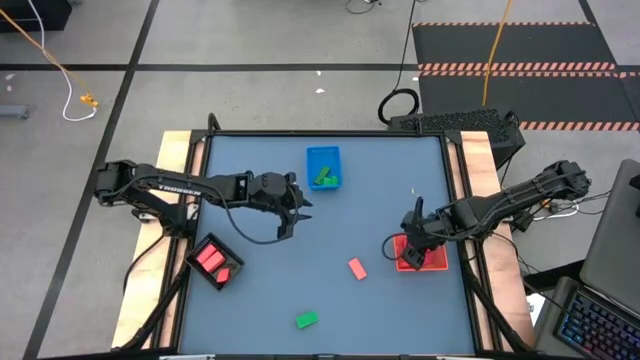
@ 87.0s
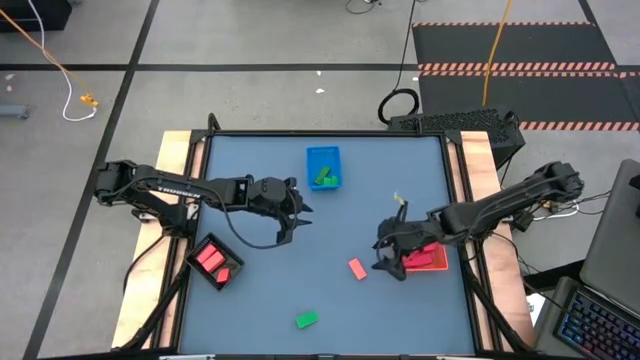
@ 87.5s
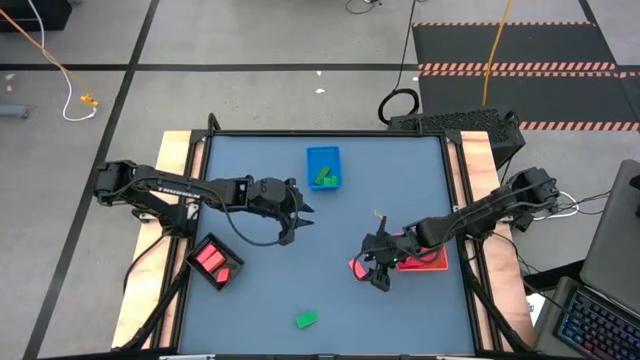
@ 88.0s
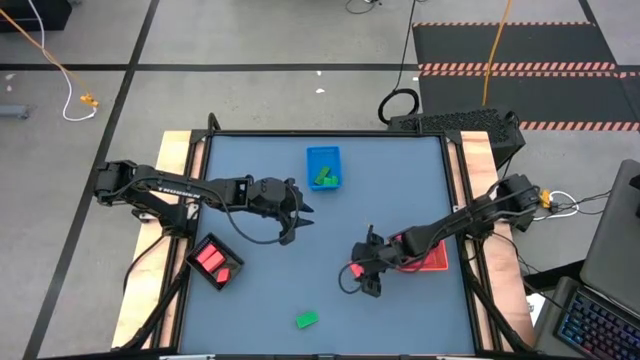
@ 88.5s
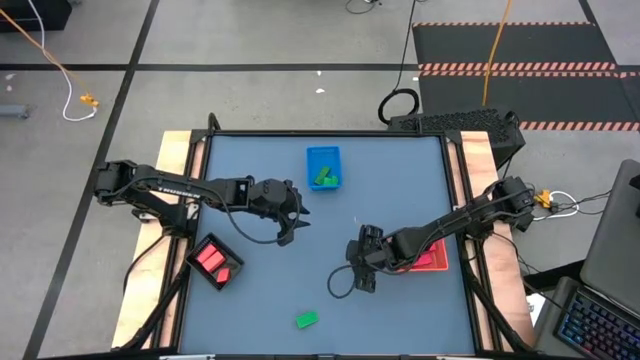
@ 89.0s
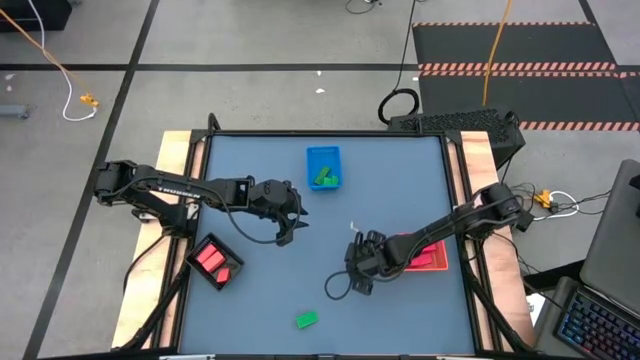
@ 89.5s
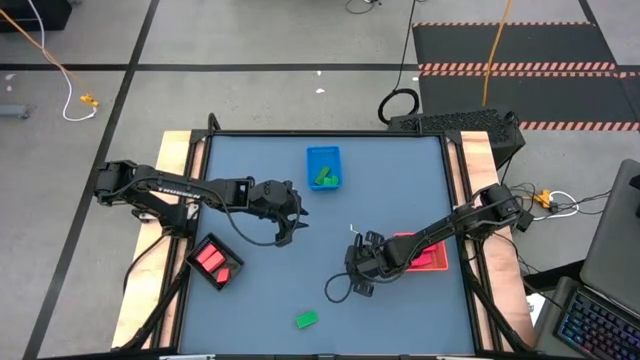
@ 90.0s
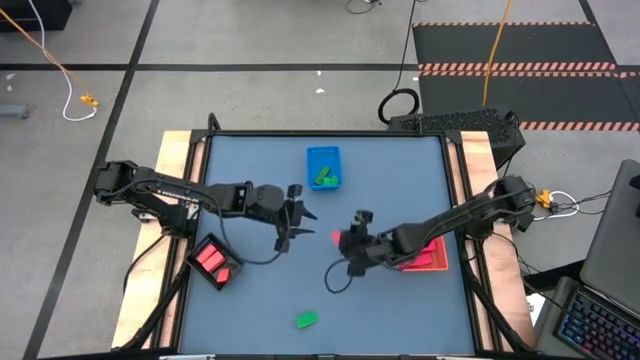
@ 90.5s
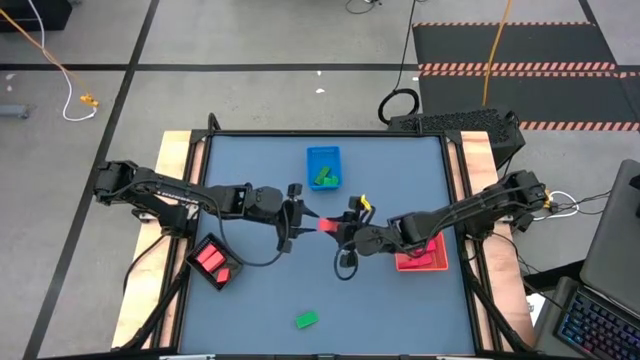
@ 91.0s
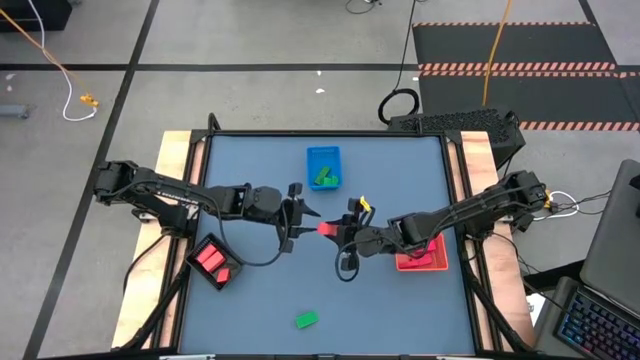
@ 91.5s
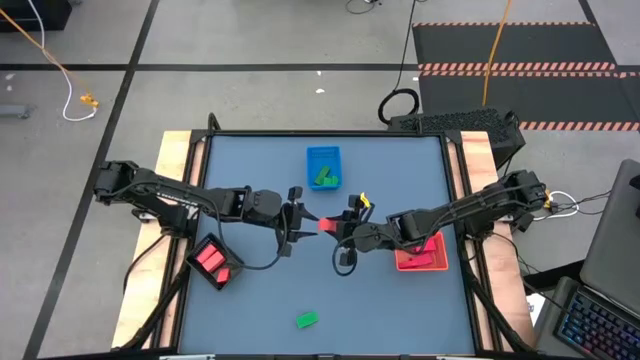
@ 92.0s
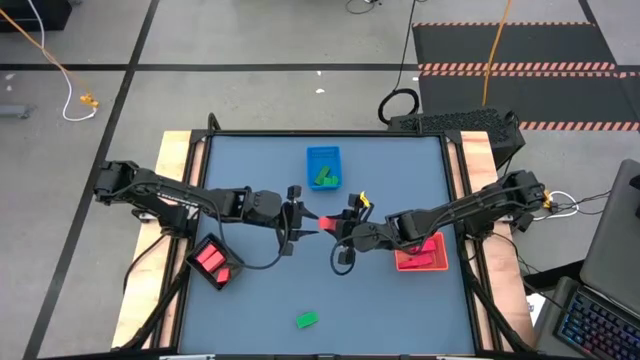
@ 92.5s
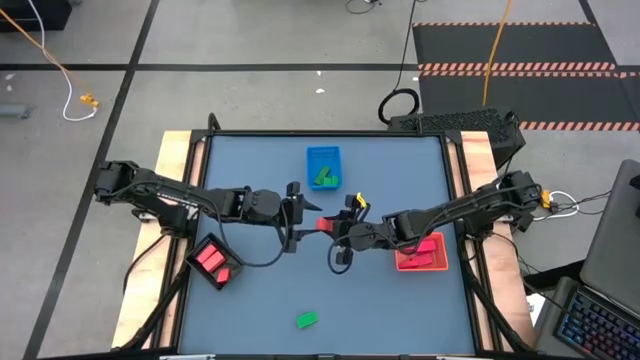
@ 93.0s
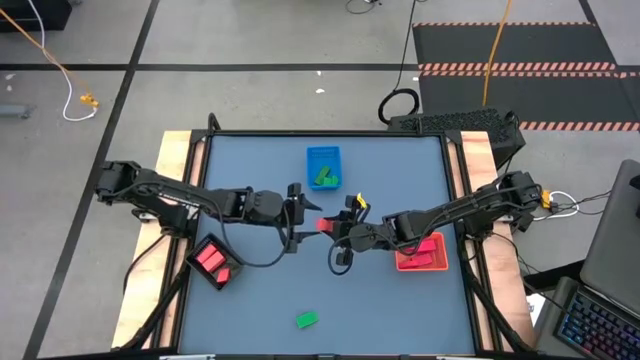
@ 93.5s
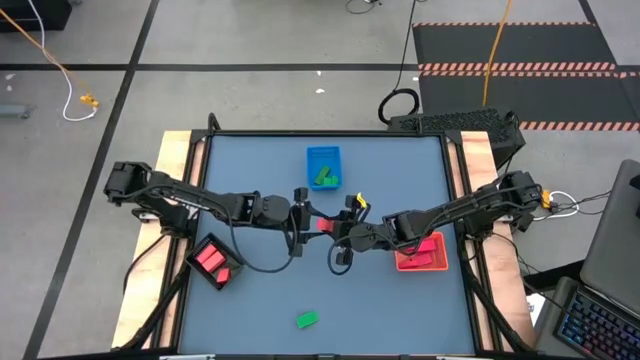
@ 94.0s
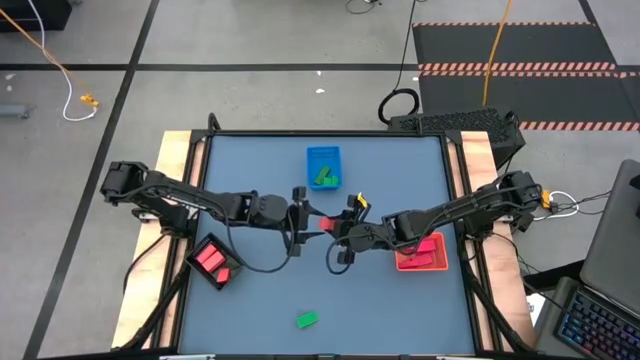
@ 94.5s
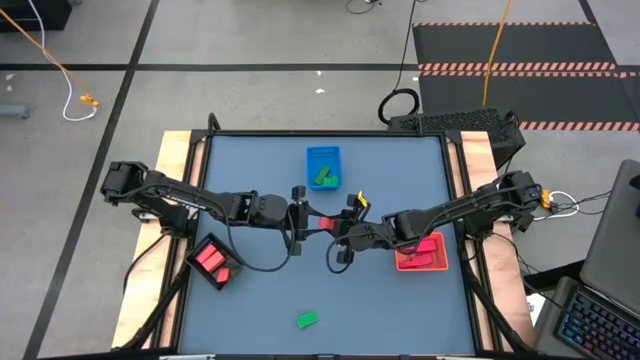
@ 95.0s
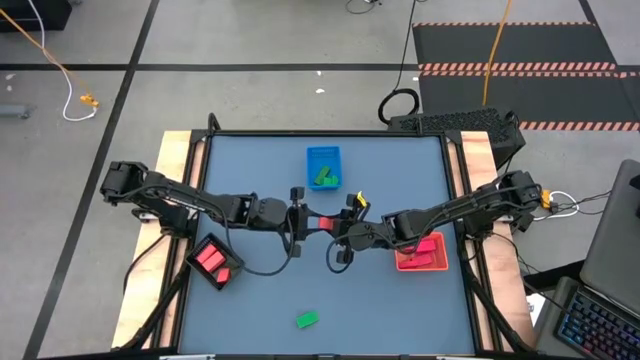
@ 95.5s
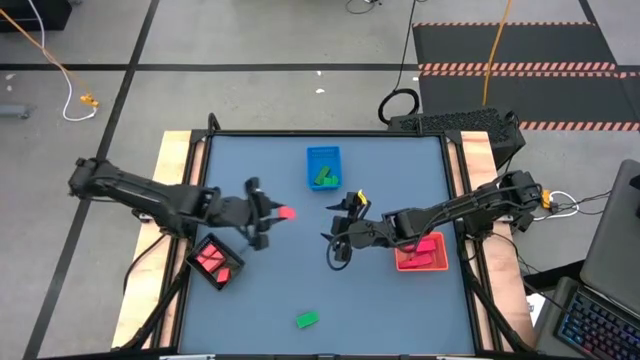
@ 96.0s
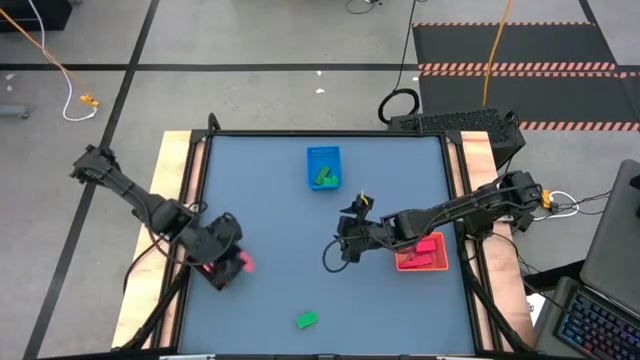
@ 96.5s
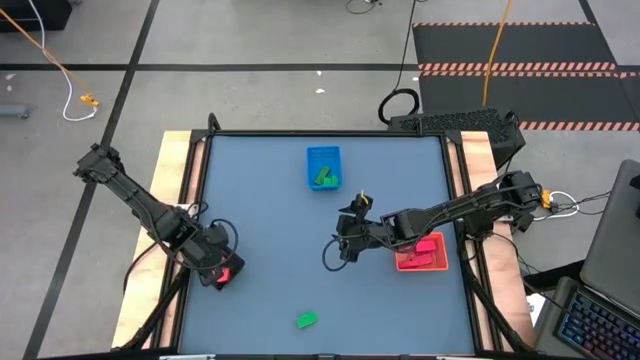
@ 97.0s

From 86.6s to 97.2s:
Task: Sort & place blocks by color
Put the orange block into the black bin

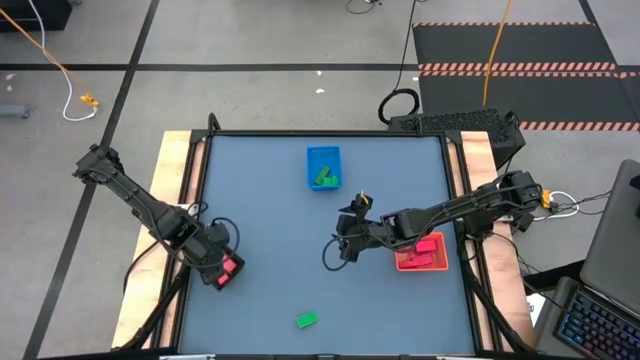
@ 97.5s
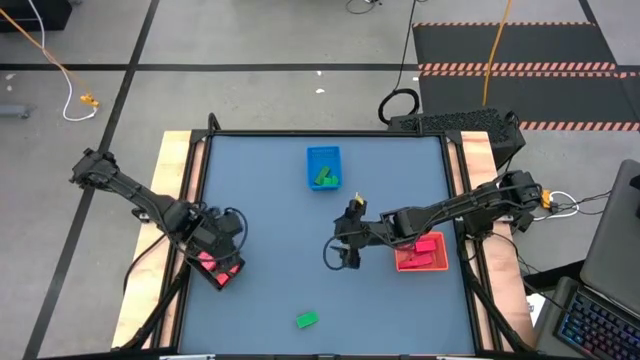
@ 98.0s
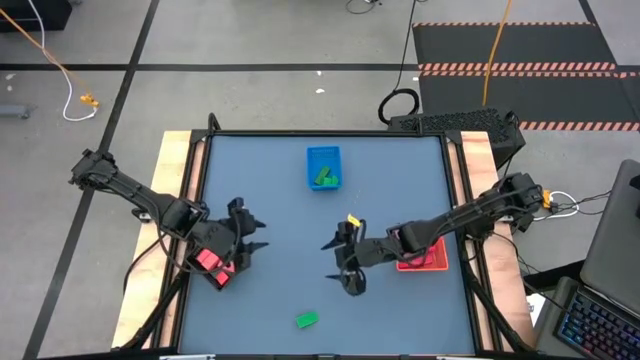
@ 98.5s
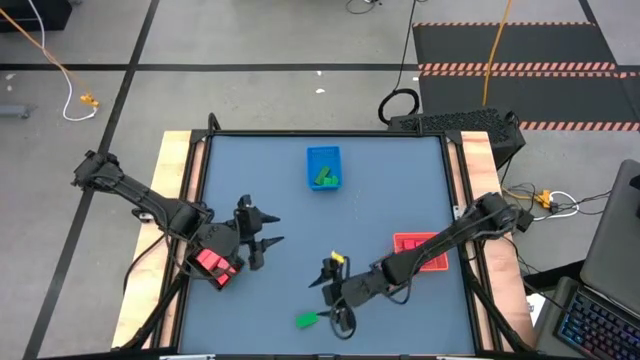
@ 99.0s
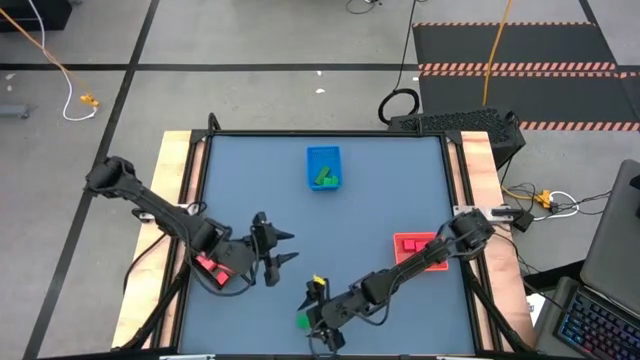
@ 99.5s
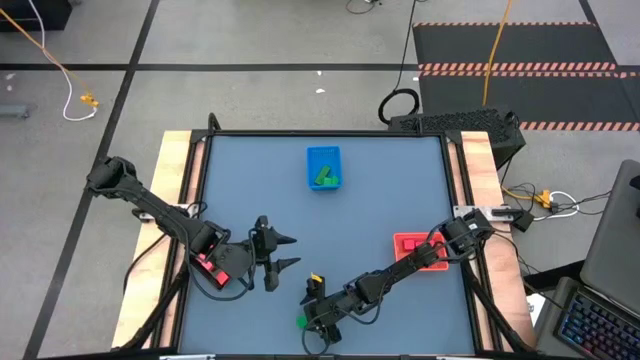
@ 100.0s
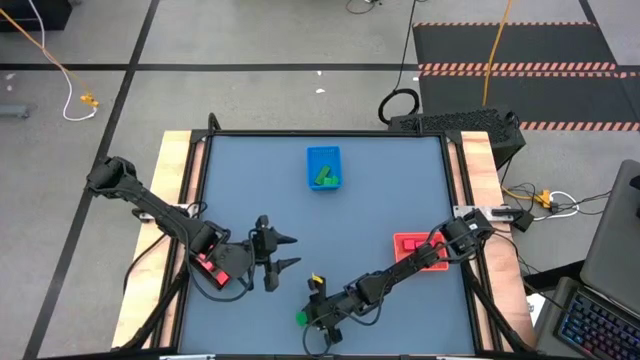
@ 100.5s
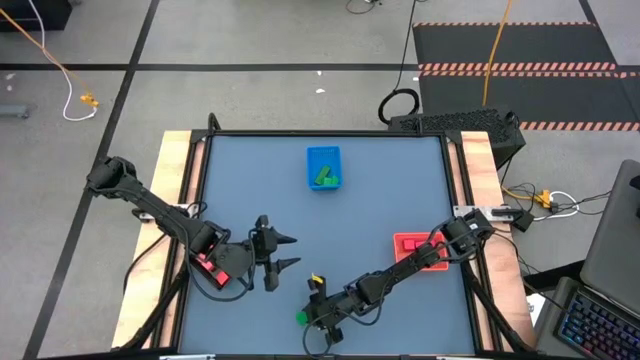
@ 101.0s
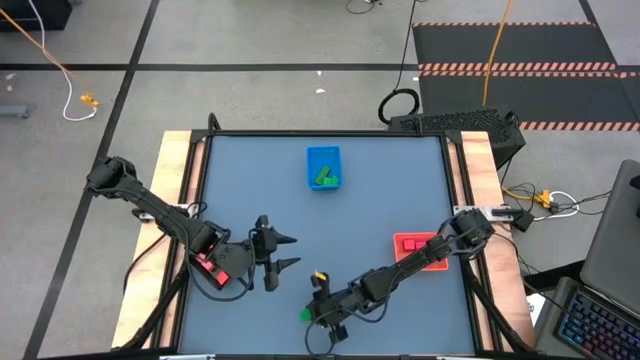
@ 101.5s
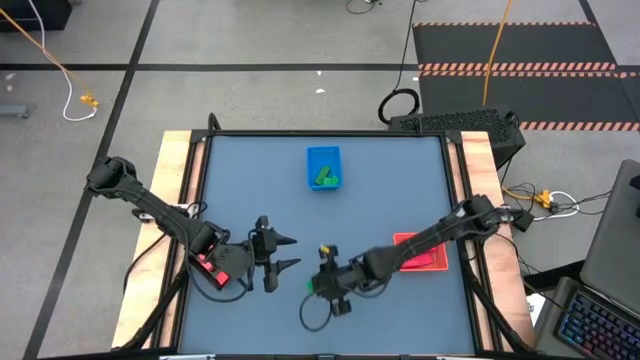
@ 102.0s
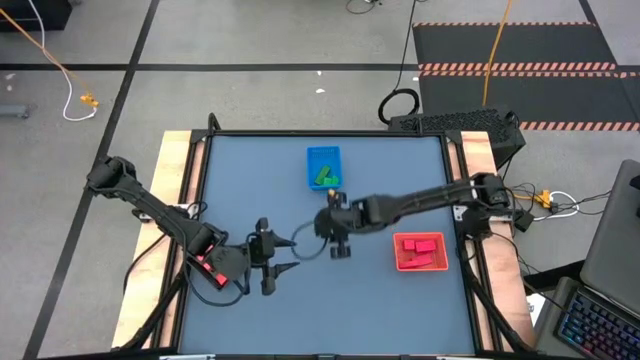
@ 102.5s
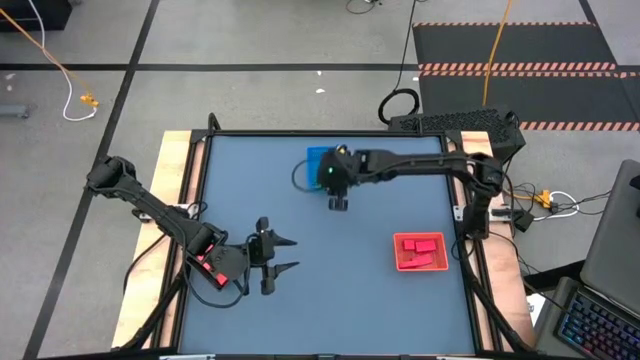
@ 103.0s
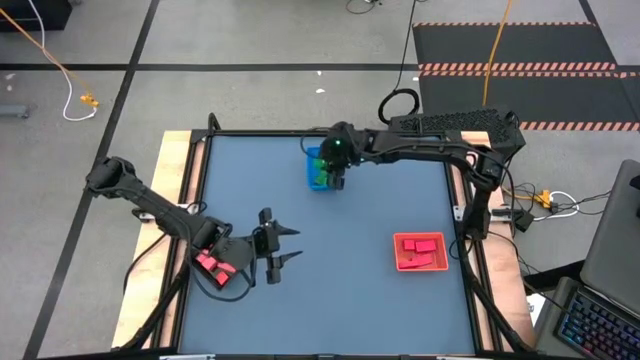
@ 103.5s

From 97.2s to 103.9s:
Put the green block into the blue bin

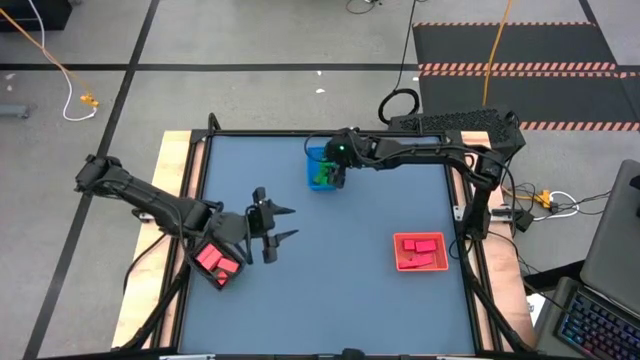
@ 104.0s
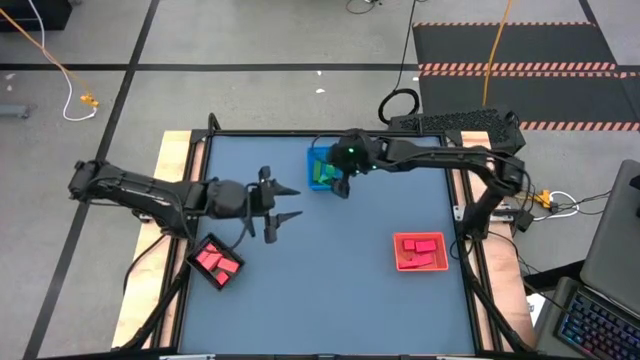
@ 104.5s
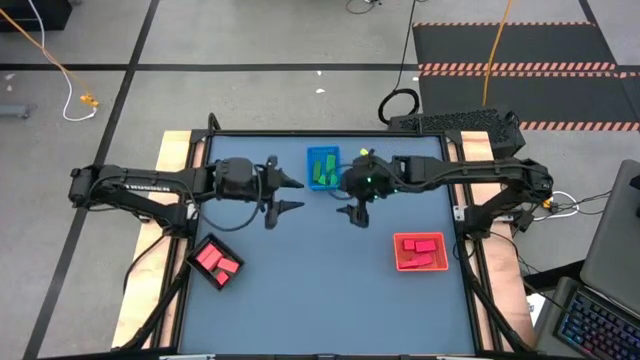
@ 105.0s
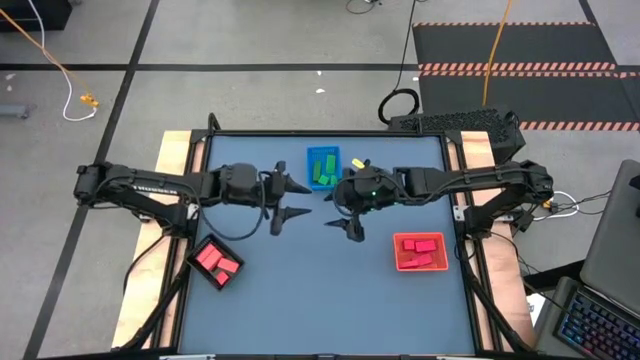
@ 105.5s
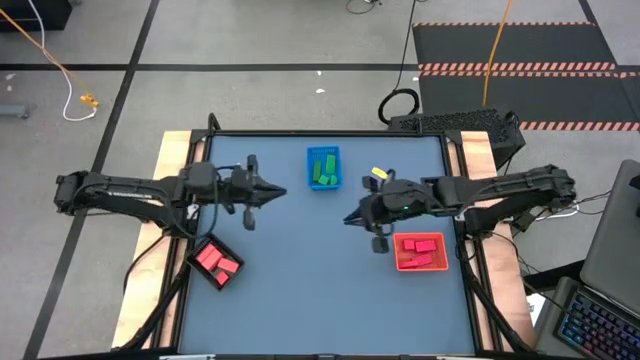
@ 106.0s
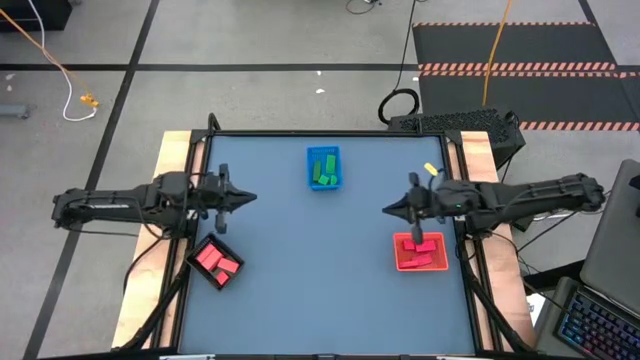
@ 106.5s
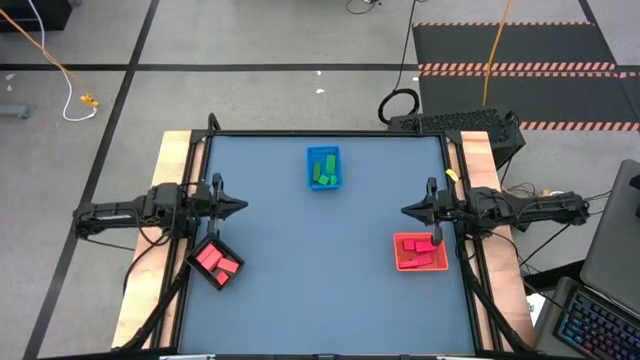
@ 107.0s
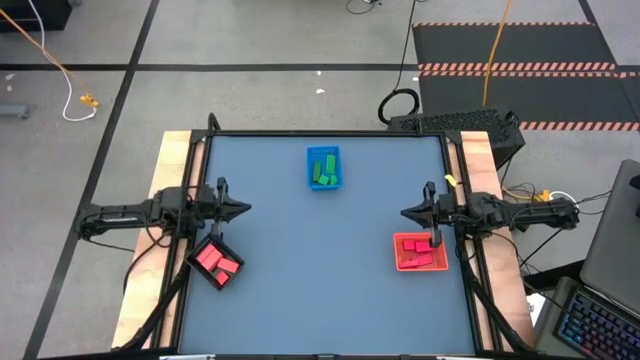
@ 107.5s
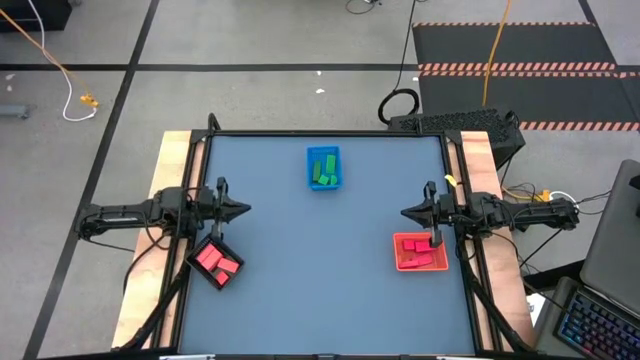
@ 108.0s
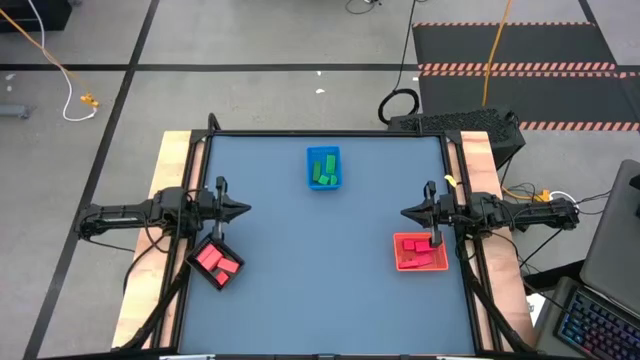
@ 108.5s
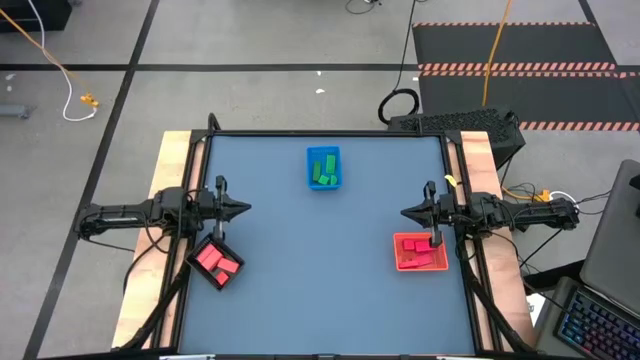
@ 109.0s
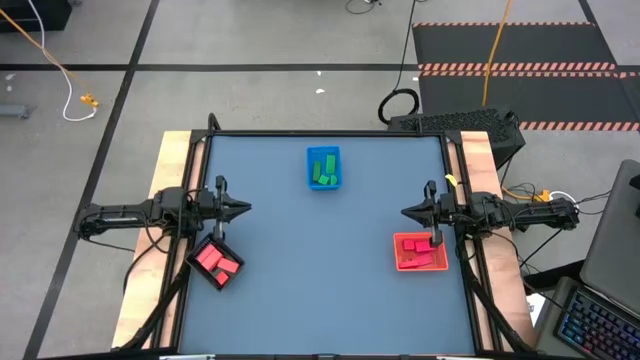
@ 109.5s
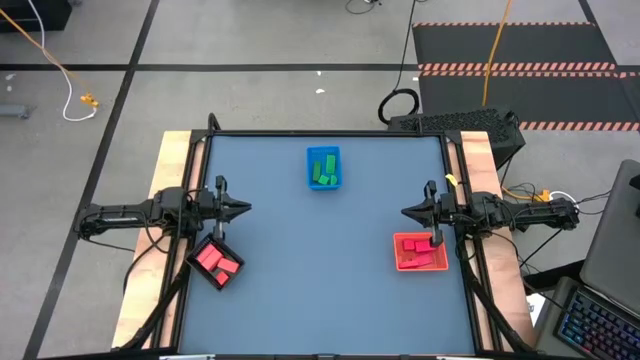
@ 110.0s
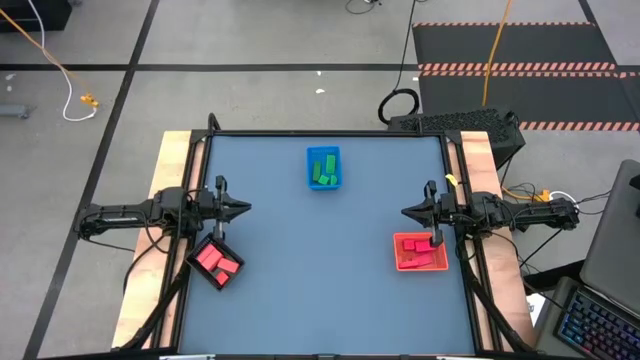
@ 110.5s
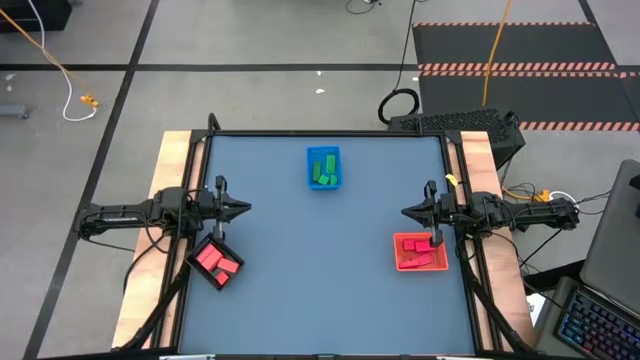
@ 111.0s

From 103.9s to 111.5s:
Return to Home Position
